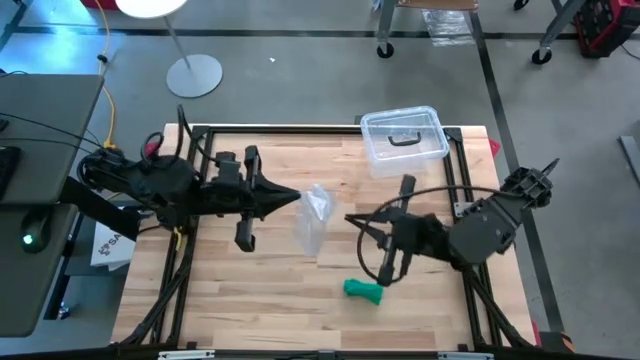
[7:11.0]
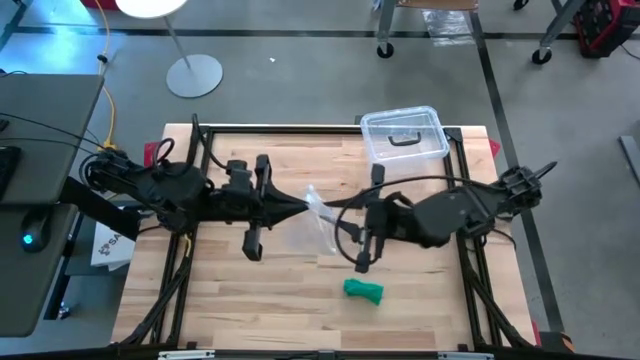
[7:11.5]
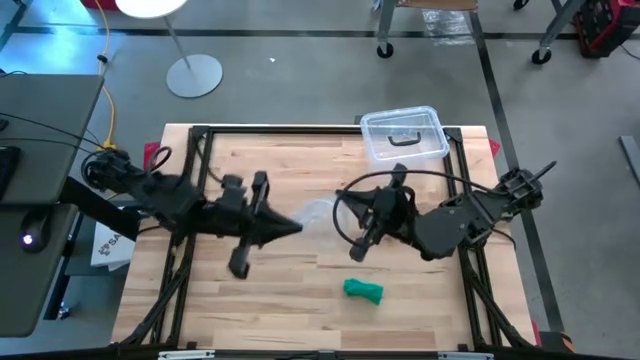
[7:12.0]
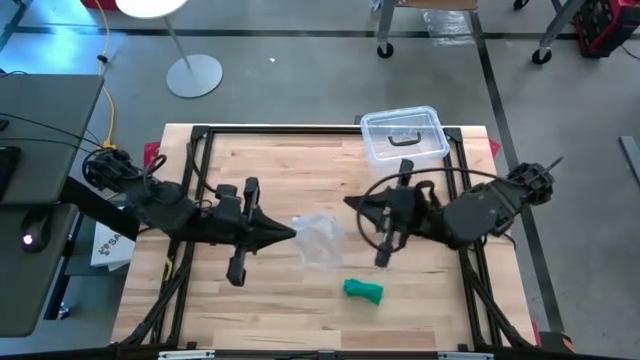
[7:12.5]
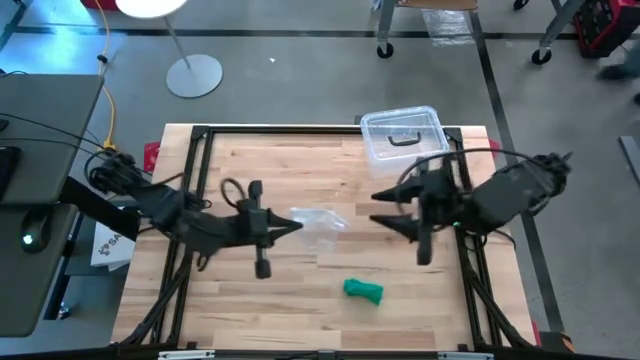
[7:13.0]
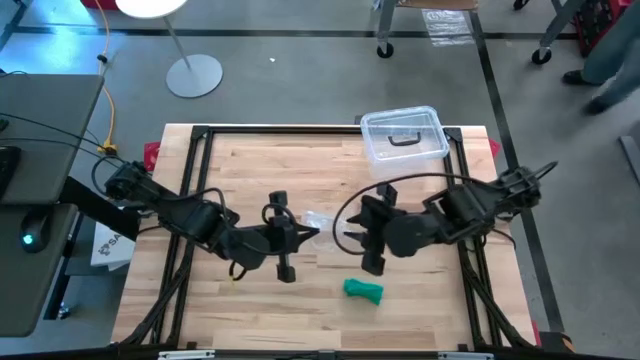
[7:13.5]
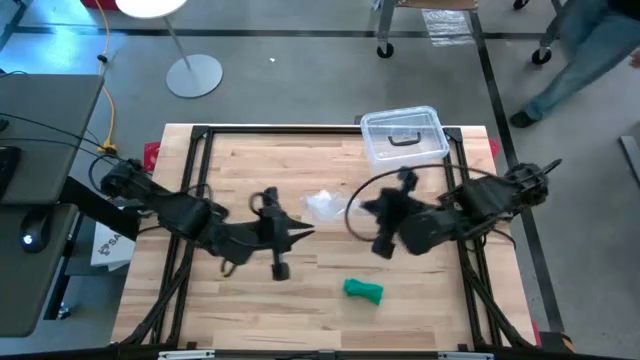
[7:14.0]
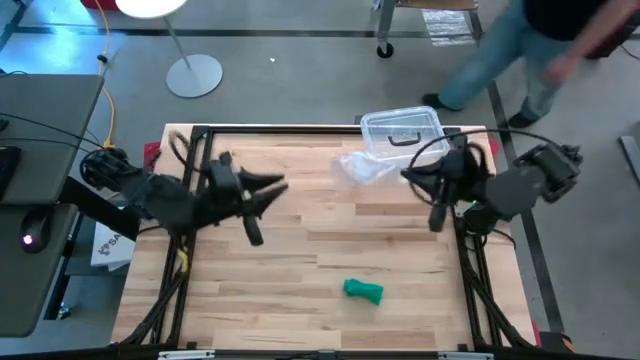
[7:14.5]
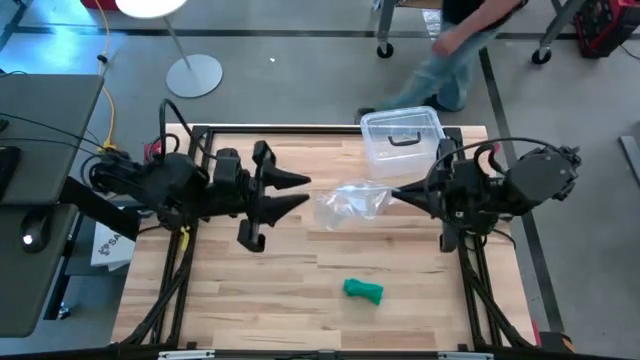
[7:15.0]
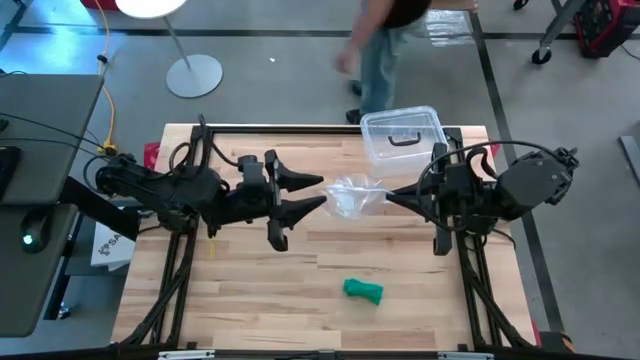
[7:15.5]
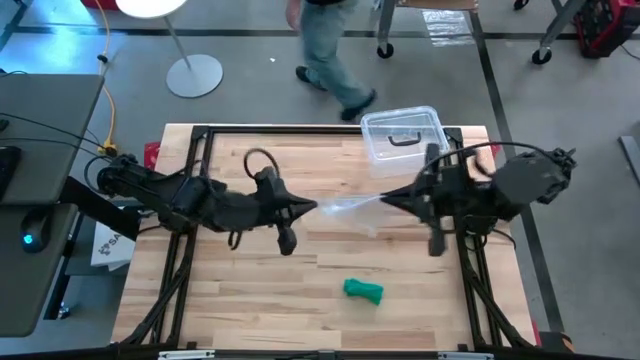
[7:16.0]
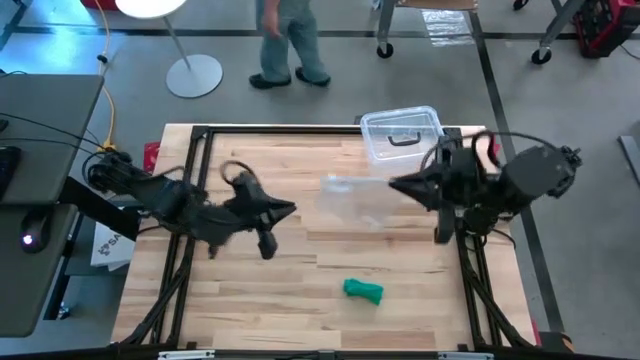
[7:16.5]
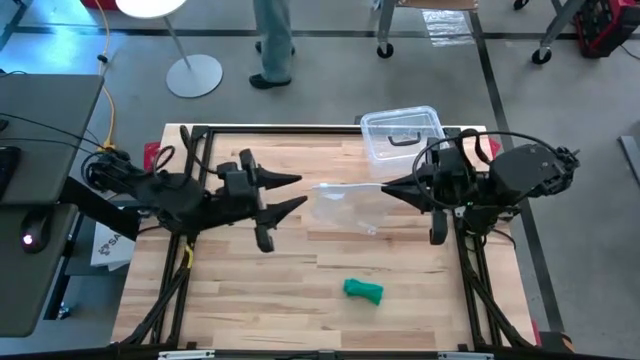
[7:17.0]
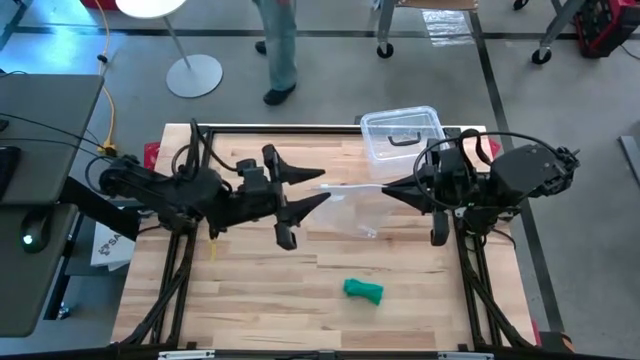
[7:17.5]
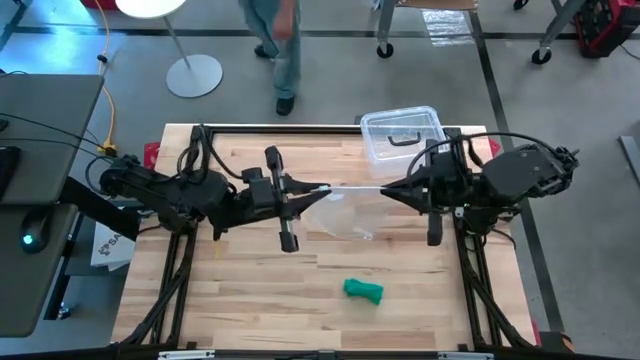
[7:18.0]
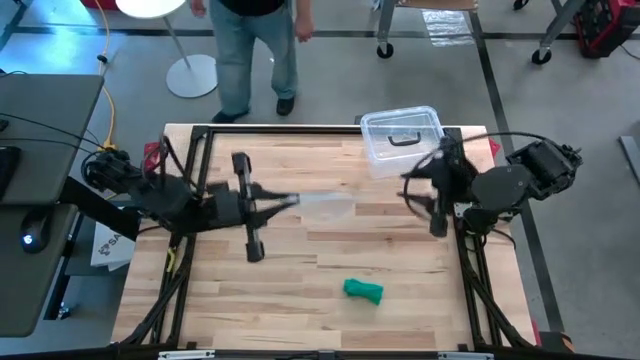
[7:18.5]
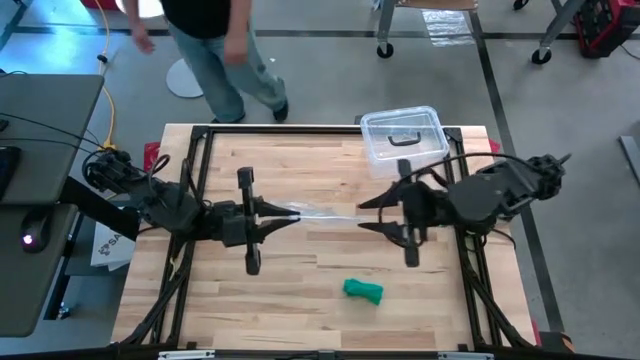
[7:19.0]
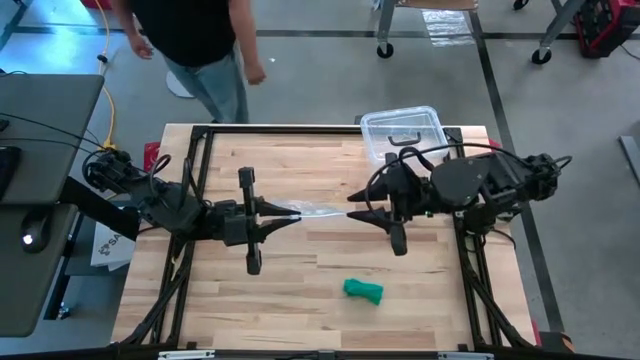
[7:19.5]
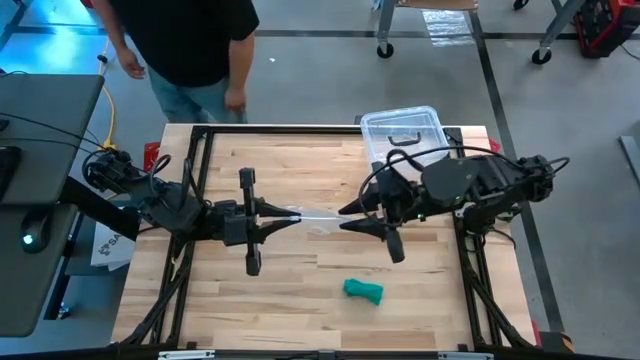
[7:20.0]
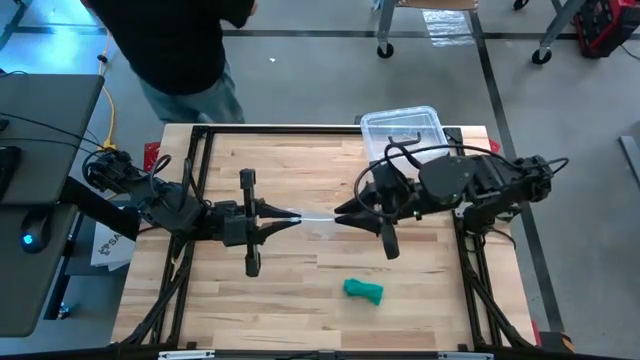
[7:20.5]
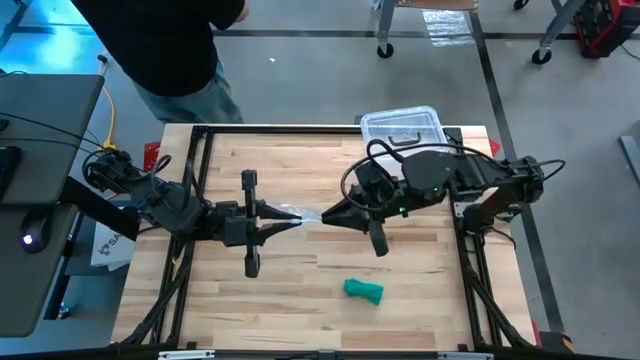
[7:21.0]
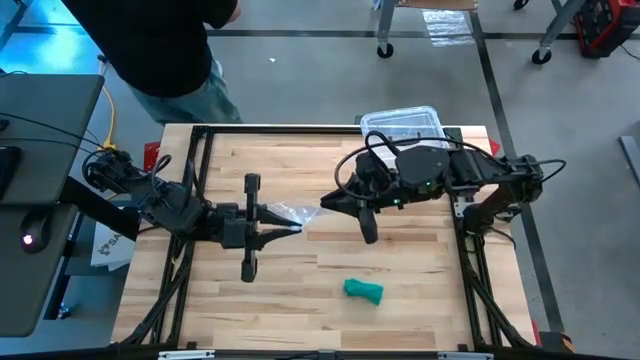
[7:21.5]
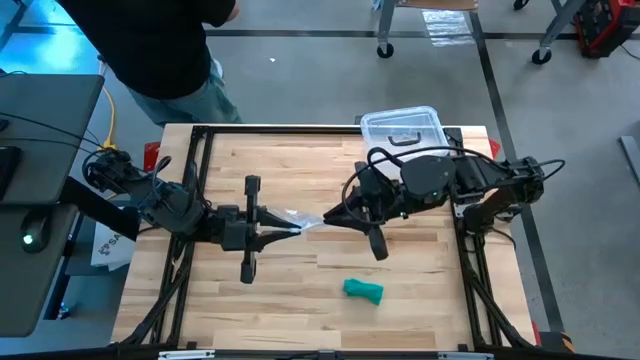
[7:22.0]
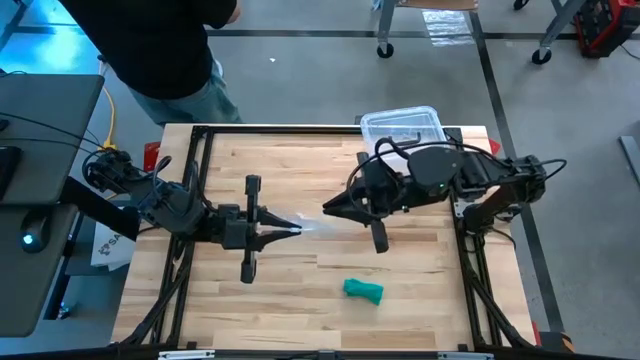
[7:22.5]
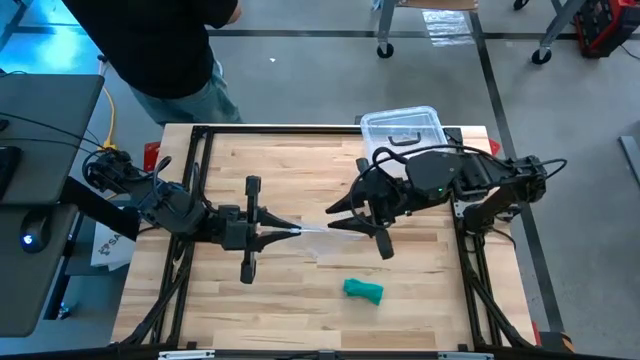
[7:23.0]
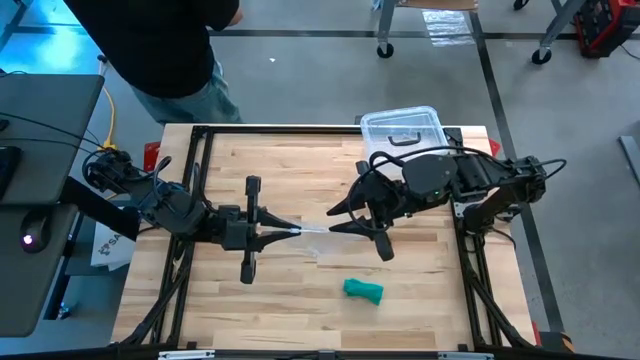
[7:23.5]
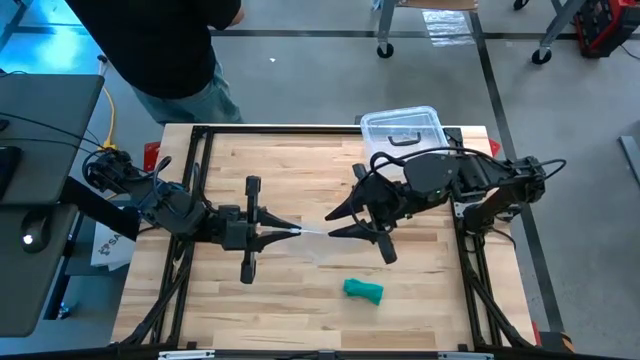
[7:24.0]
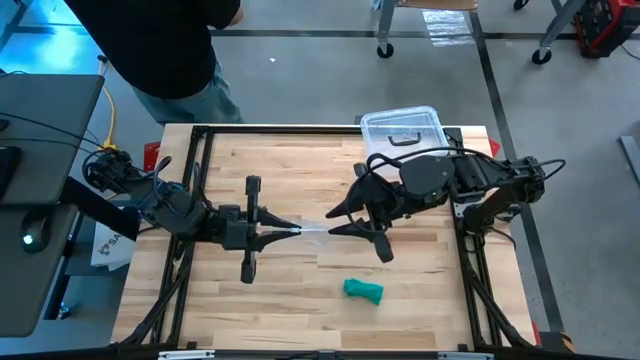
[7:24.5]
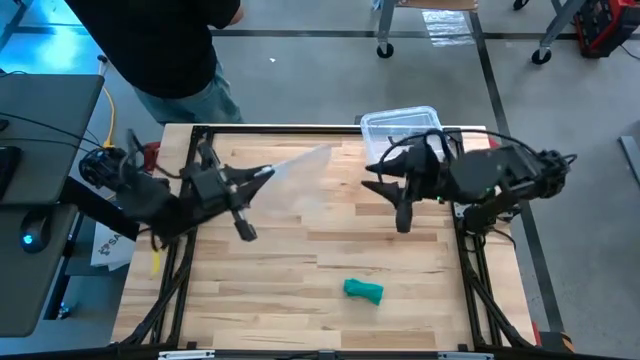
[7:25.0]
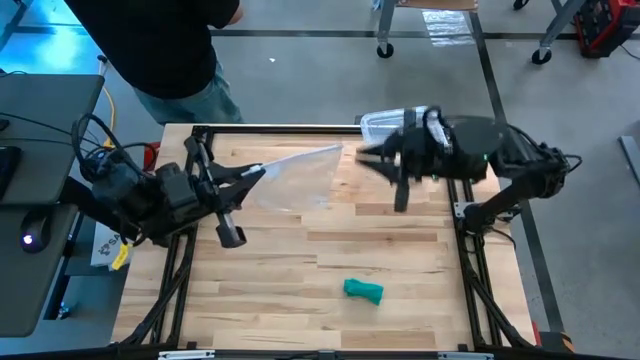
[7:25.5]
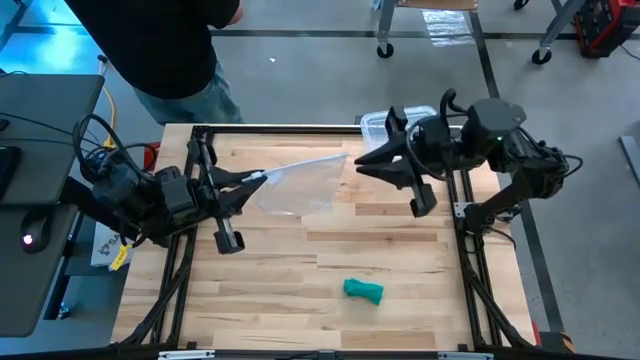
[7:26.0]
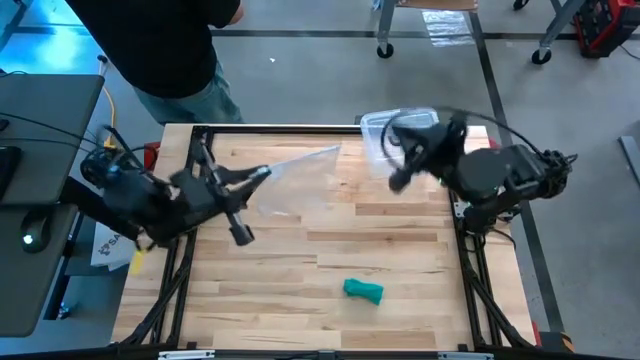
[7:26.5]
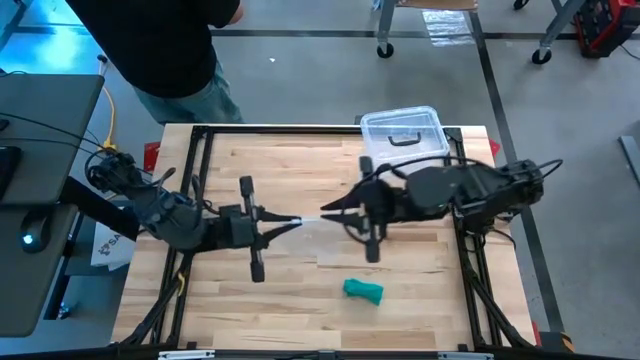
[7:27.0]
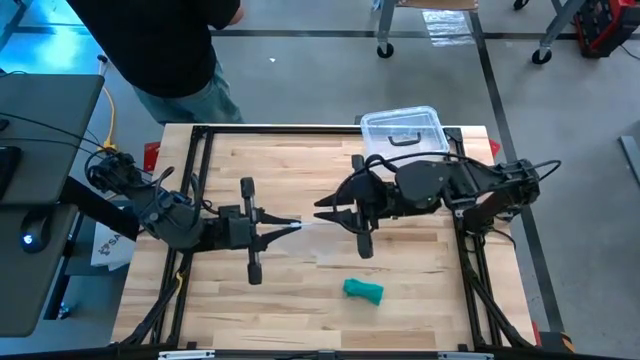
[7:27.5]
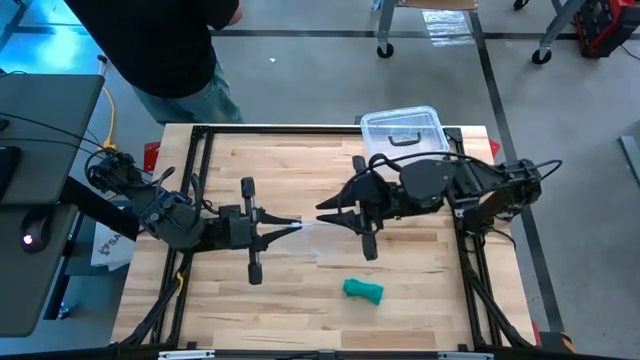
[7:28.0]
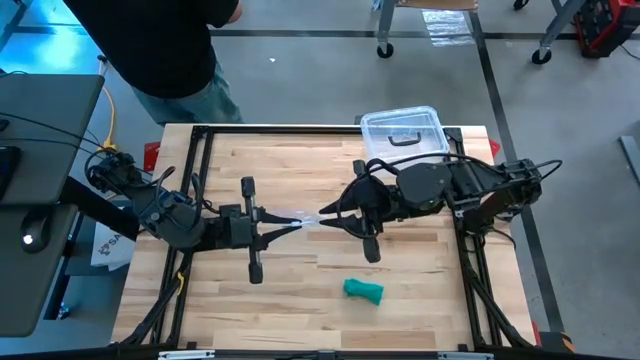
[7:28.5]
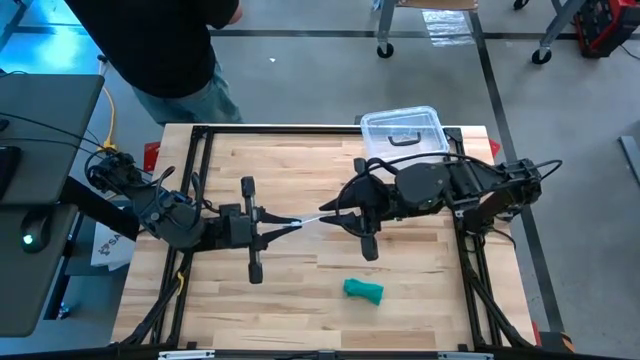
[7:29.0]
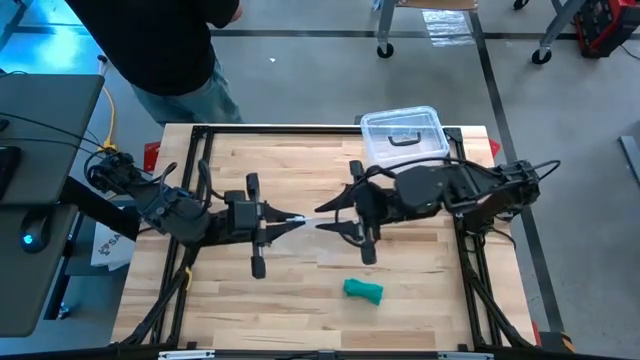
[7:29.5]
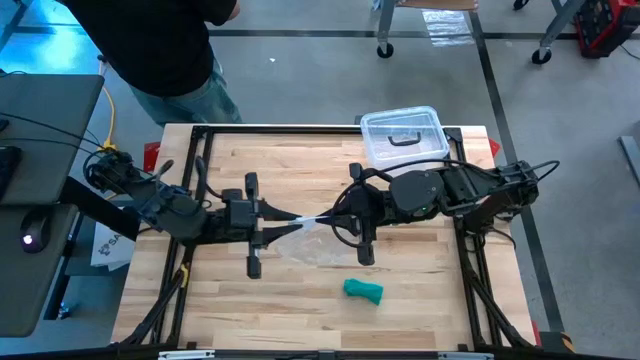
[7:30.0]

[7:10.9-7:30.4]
Task: Roll bandage
Open the transparent zip bag

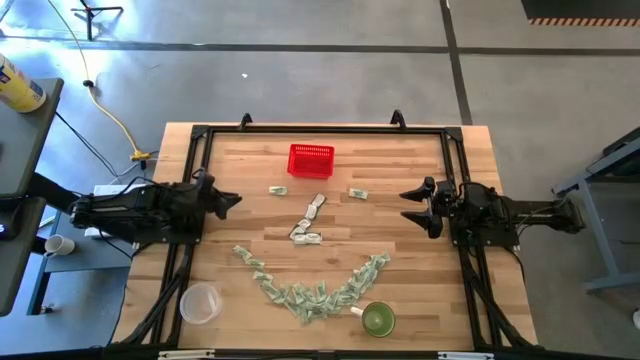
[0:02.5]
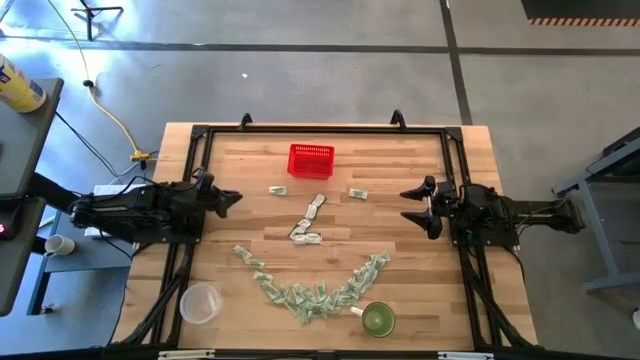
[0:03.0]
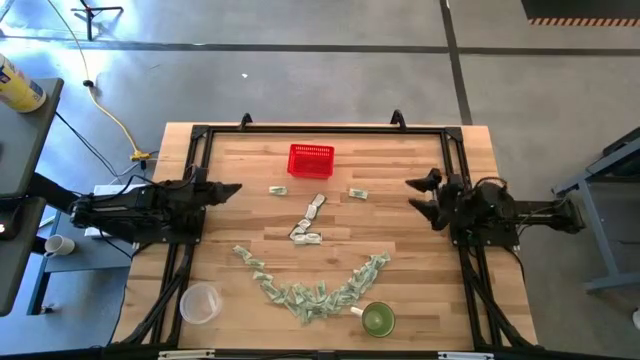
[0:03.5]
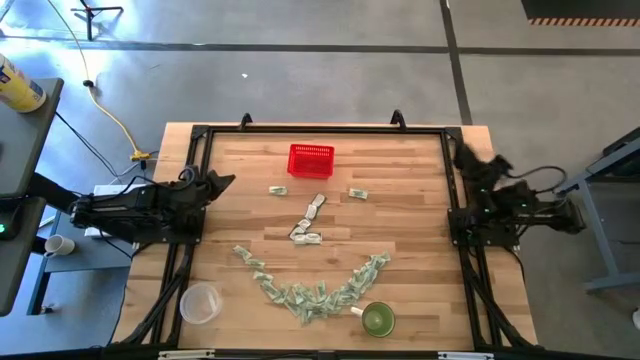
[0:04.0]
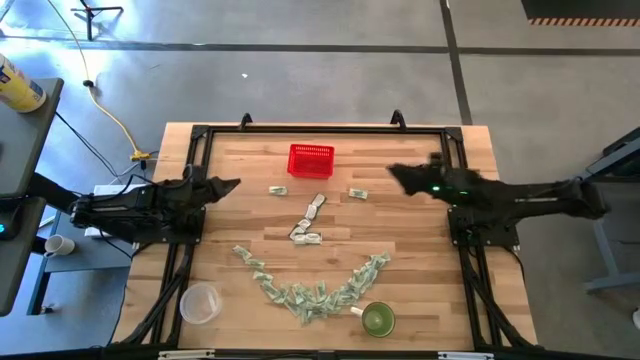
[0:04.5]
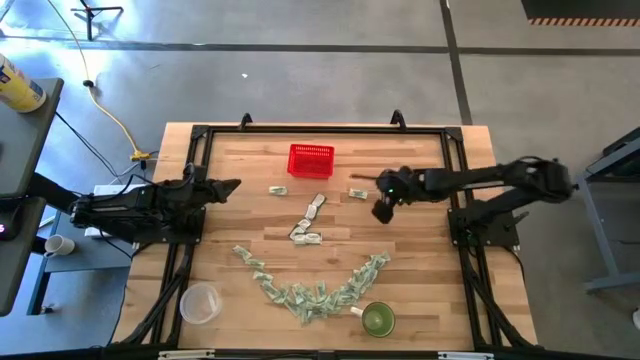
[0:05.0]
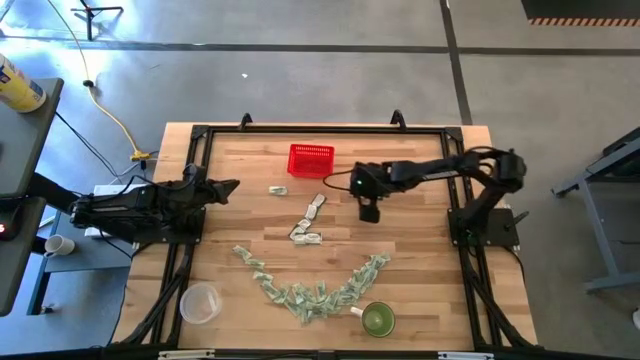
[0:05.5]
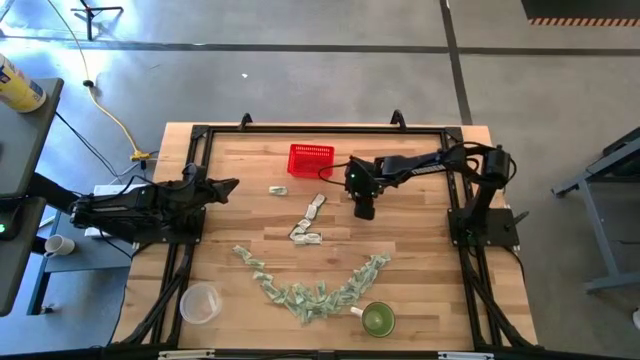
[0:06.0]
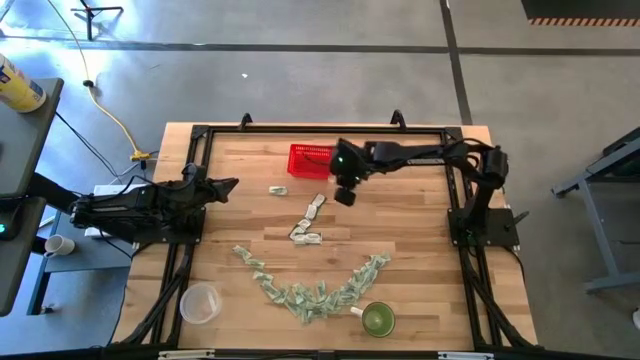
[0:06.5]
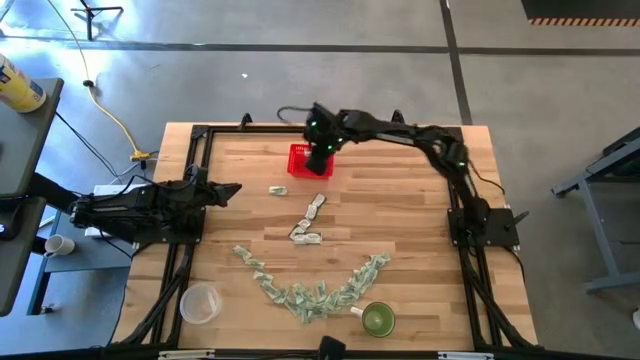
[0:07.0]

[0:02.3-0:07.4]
Task: Pick and place items into bin
Put the light green stevia packet into the red bin
